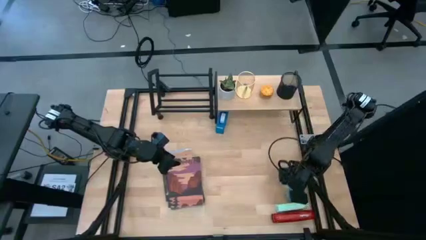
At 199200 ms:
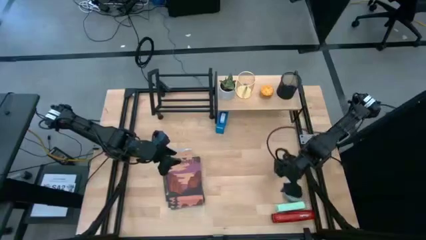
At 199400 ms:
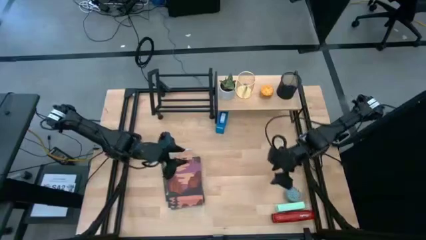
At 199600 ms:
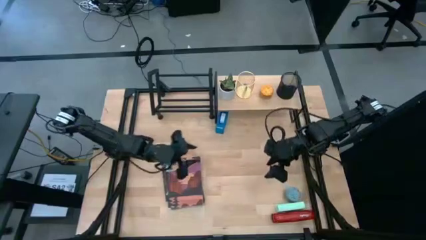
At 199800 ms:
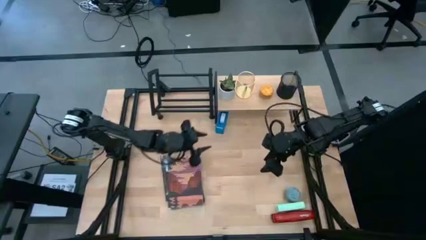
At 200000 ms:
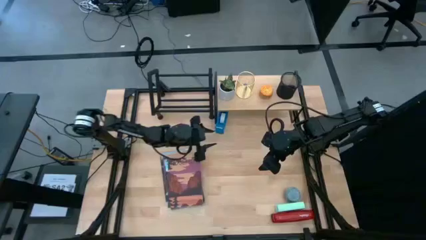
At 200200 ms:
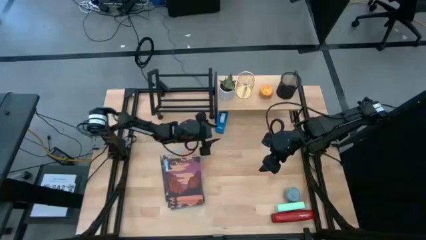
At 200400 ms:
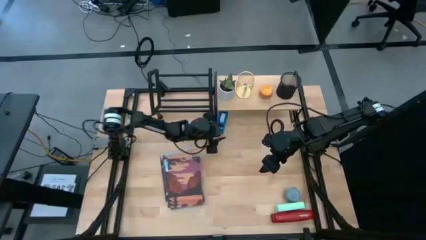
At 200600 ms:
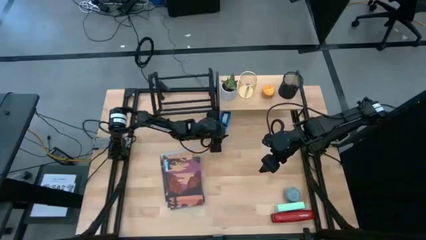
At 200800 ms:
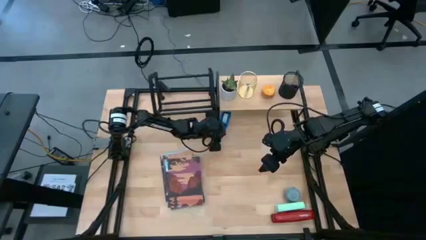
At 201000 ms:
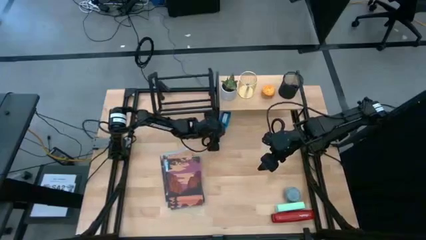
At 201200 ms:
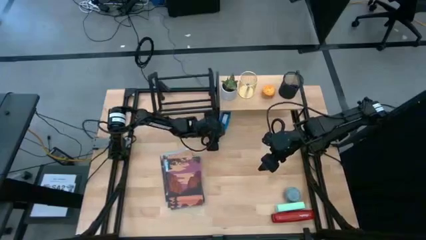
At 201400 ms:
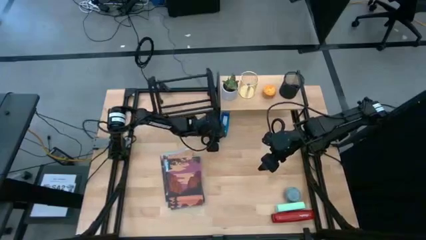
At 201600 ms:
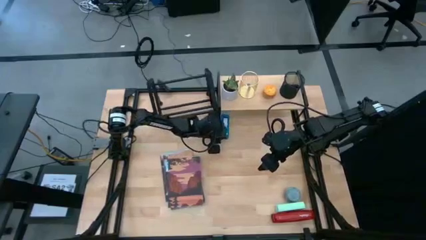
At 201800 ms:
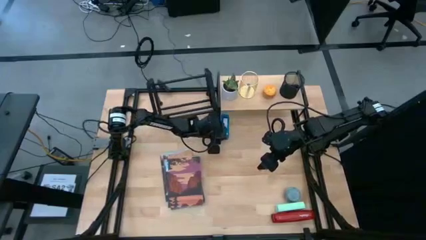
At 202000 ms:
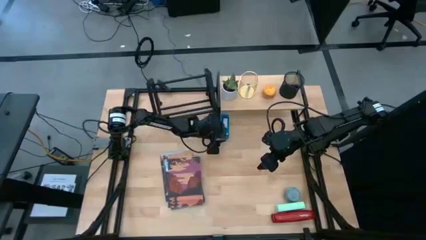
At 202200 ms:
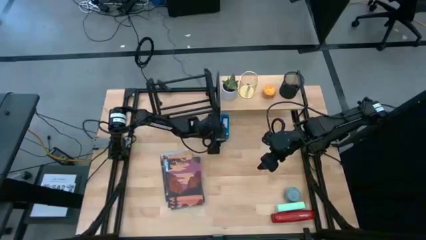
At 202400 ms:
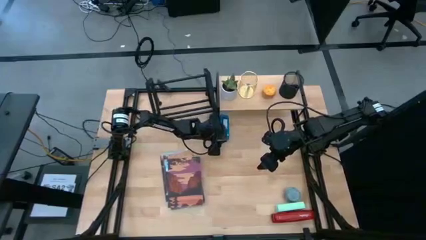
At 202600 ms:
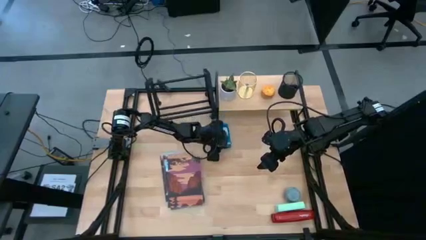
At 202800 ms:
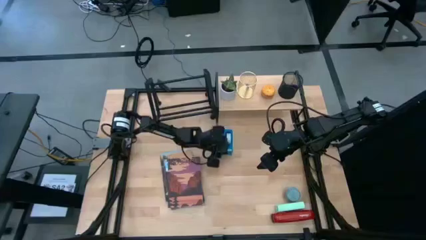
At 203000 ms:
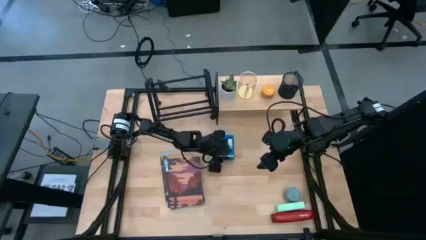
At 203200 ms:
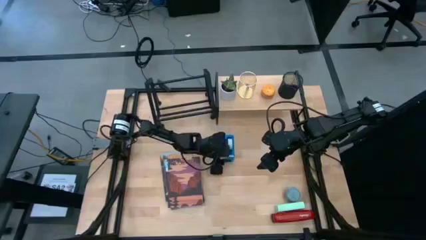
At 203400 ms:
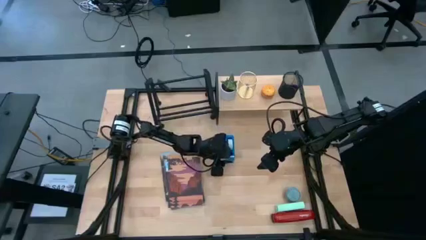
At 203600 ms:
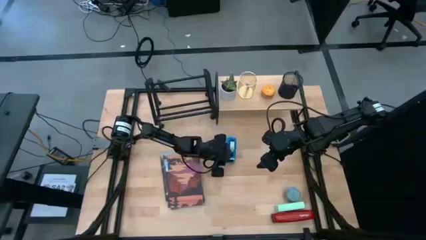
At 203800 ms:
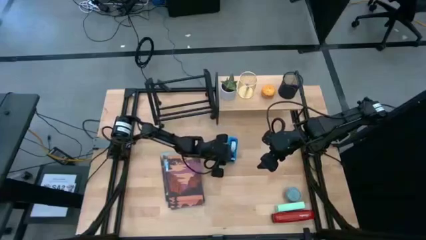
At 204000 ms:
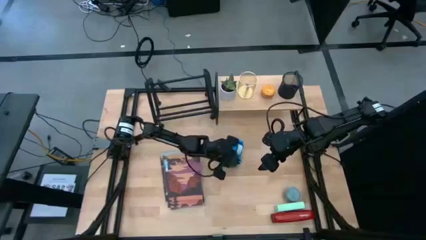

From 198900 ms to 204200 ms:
Task: Stock shelves
Remove the blue tape dispenser from under the shelf

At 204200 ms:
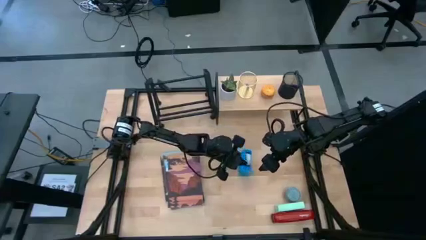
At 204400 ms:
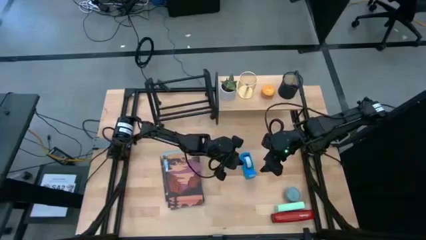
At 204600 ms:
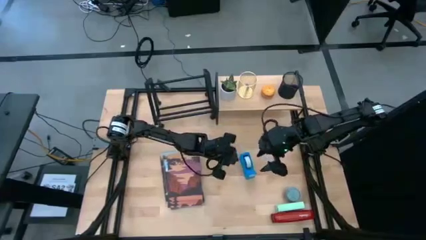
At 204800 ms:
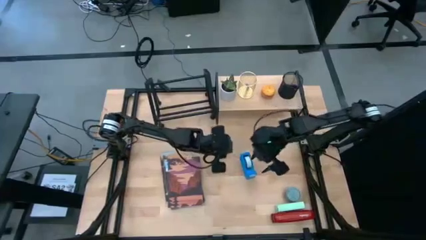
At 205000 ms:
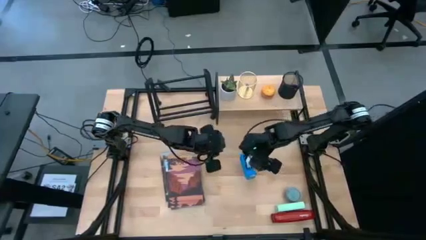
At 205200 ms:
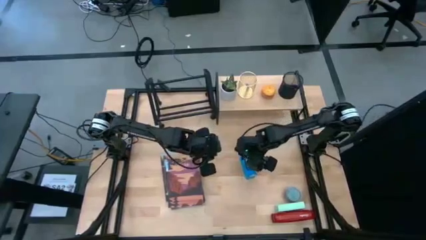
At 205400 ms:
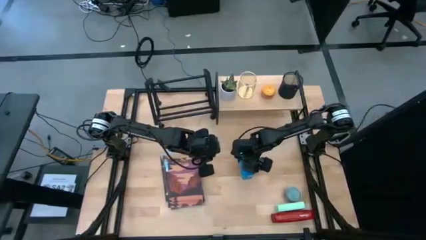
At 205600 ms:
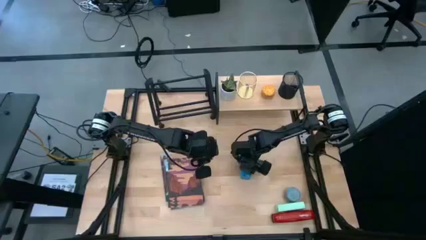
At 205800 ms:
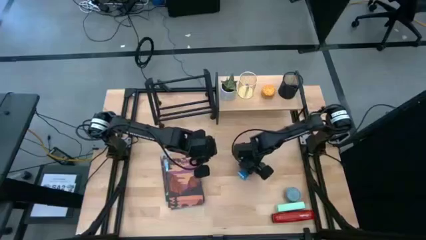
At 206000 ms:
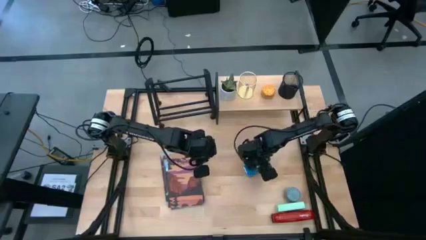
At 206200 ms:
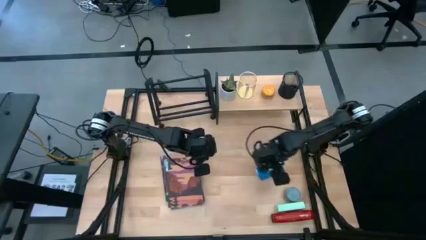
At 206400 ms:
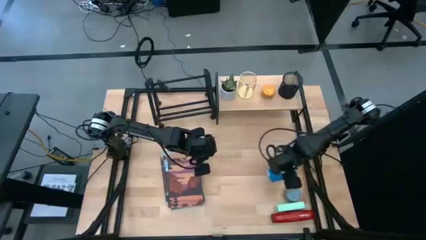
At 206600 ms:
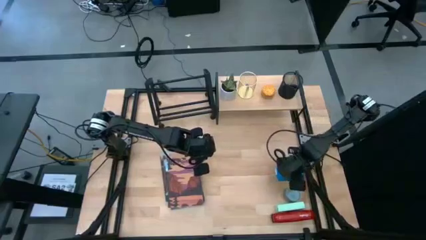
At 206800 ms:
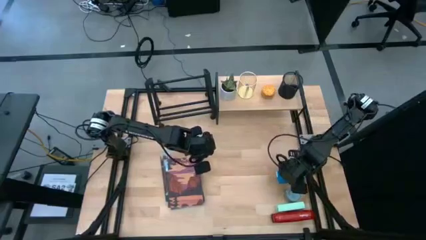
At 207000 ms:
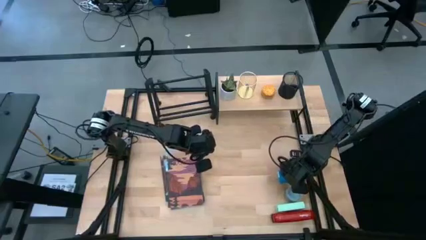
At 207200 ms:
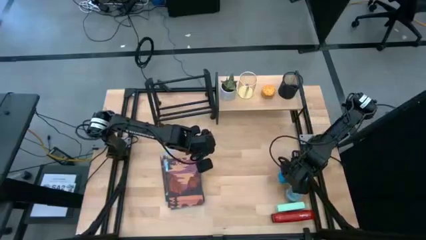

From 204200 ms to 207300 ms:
Remove the blue tape dispenser from under the shelf

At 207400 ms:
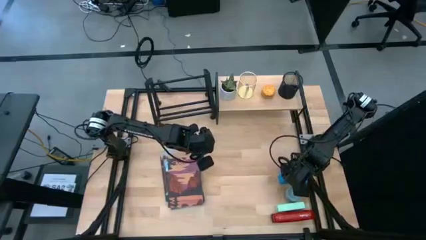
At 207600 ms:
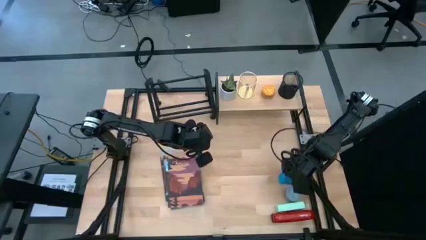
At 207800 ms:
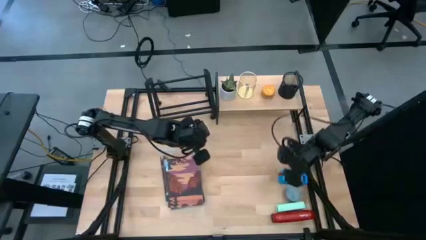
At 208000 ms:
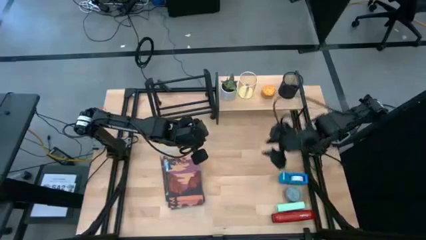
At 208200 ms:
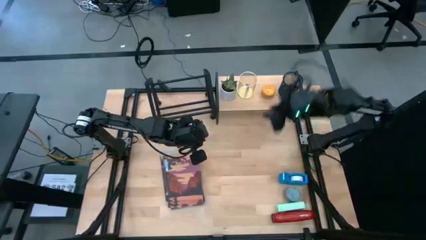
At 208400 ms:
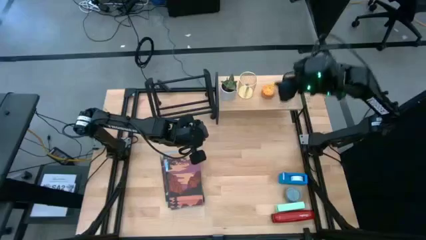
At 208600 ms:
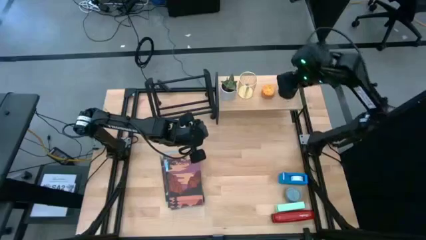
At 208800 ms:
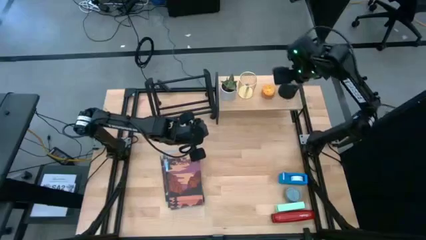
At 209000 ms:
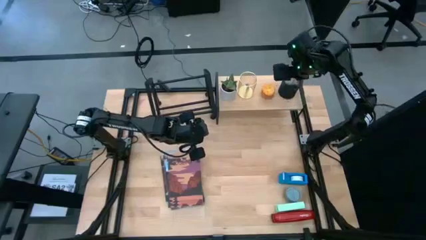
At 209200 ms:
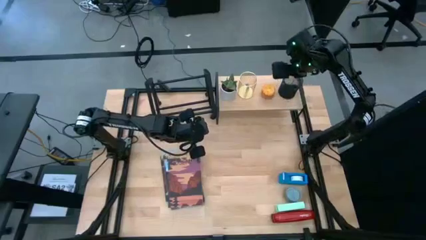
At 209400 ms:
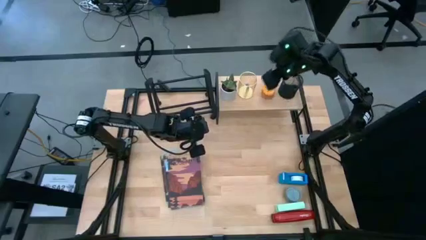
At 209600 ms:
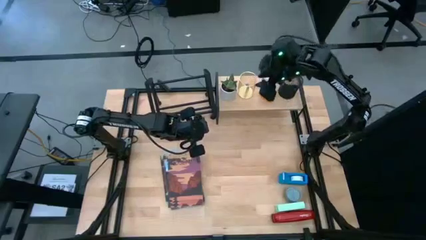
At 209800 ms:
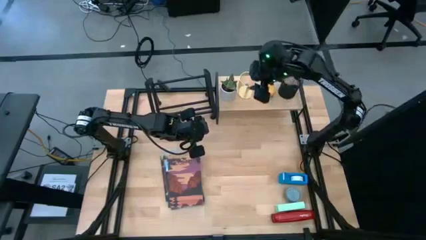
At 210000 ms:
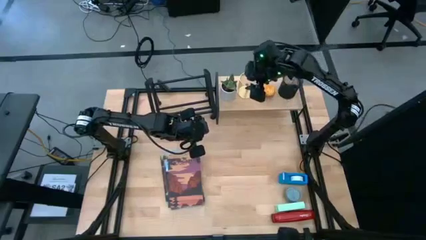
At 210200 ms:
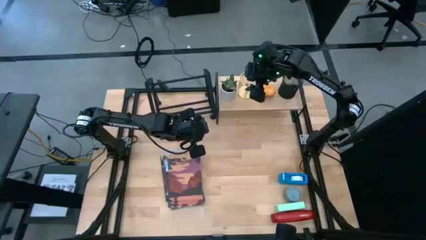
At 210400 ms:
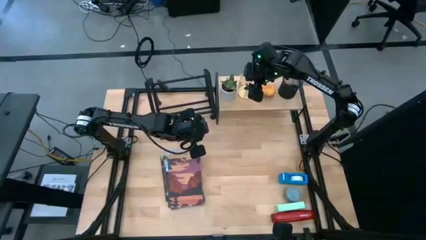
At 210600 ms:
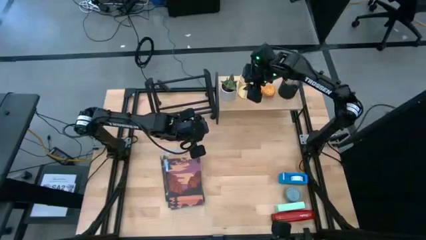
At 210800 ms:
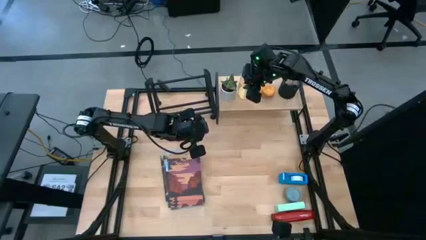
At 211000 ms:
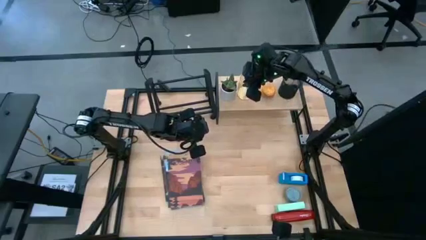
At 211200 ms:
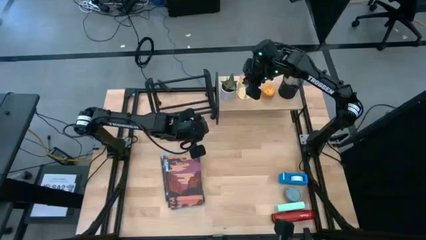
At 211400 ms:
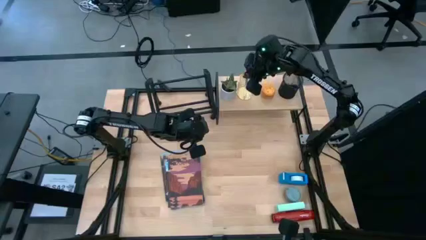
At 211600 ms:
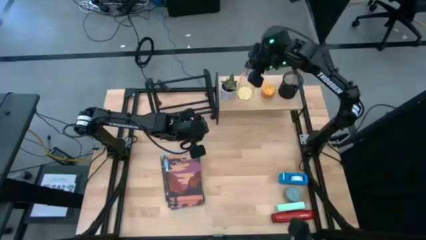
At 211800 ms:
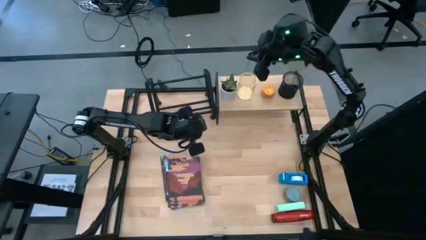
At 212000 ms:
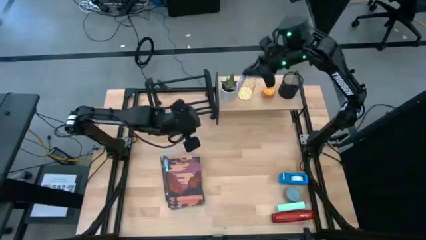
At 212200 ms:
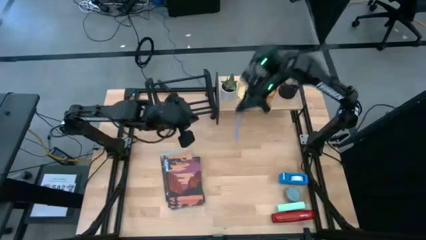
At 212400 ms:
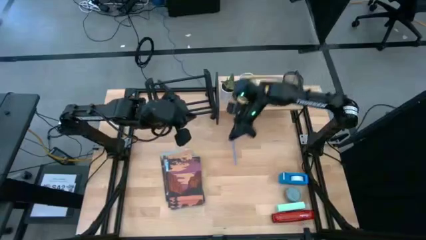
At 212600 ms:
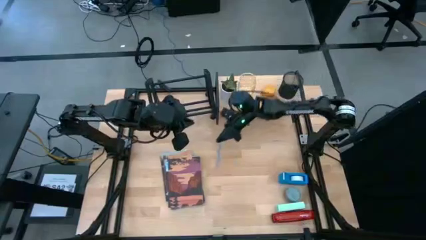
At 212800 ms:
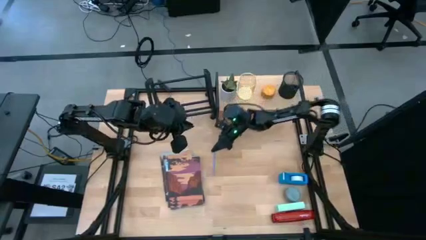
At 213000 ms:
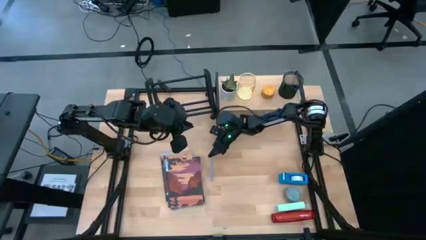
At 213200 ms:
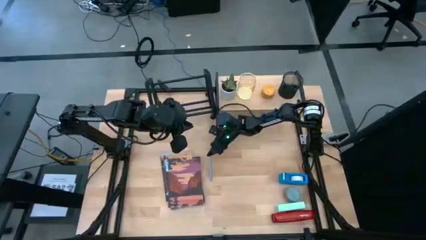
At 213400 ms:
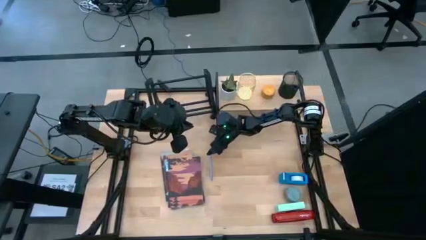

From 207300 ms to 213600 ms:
Remove the purple pen from the yellow pen organizer on the shelf

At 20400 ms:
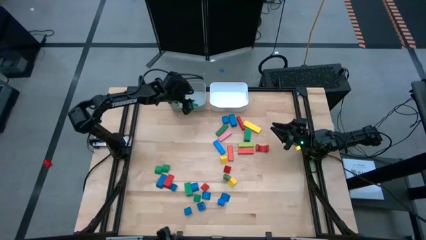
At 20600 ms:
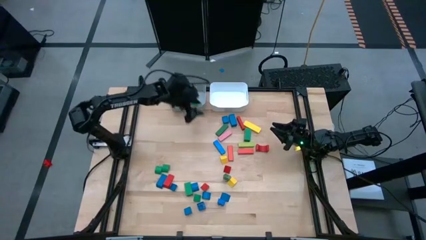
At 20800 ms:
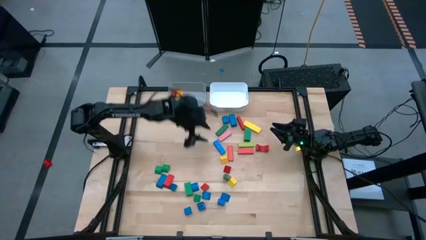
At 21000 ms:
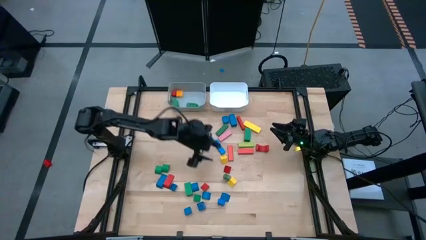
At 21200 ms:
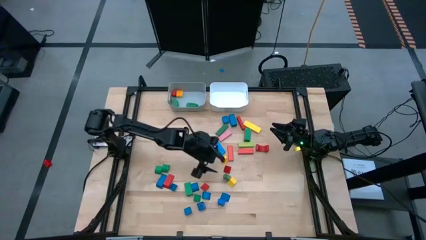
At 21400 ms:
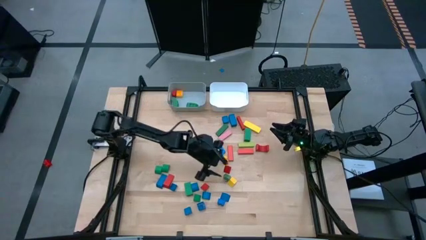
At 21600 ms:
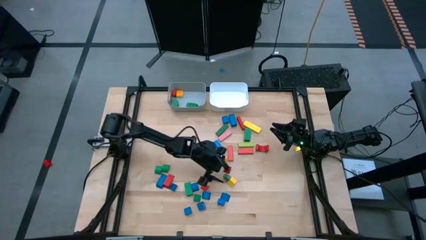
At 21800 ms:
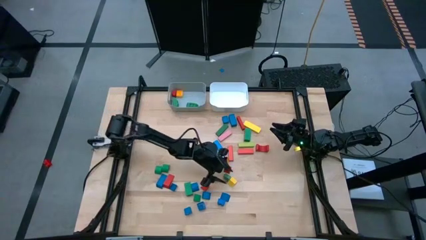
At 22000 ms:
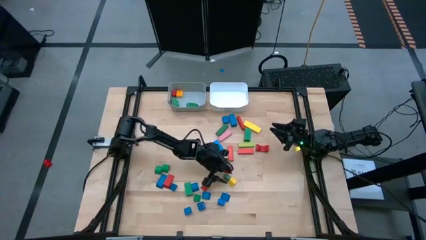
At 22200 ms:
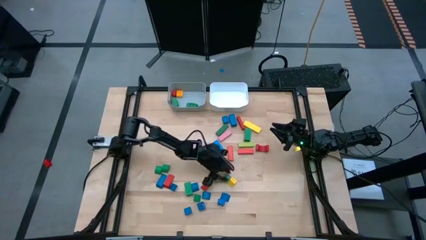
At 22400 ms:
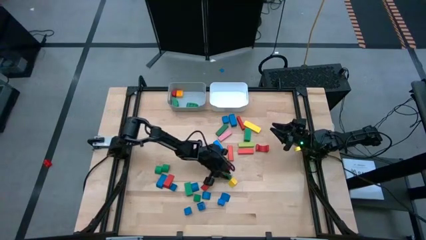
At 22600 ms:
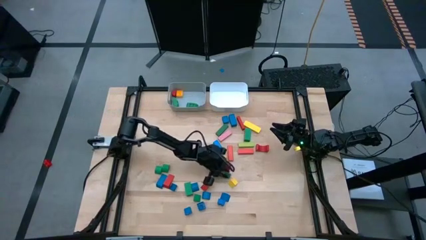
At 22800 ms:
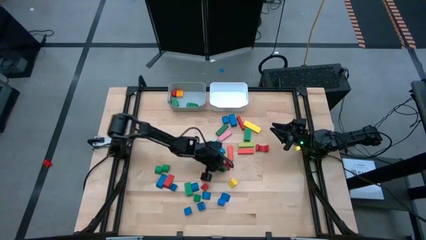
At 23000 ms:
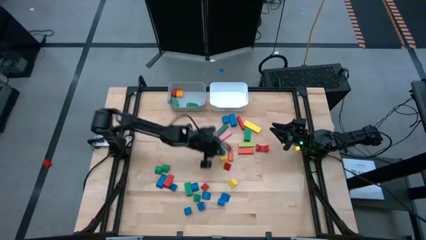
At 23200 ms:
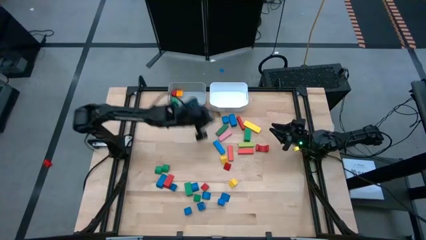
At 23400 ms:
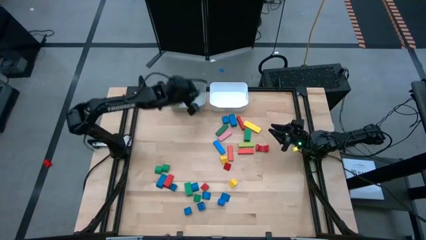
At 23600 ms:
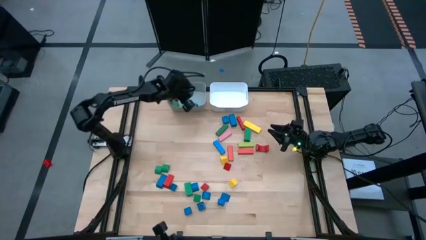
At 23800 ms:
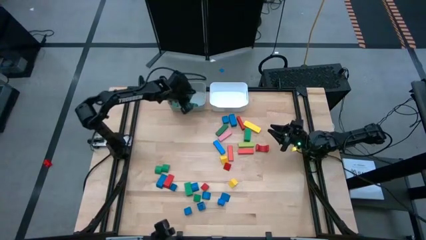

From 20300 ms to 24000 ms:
Task: Sort blocks by size
Put the green triangular block into the gray bin
